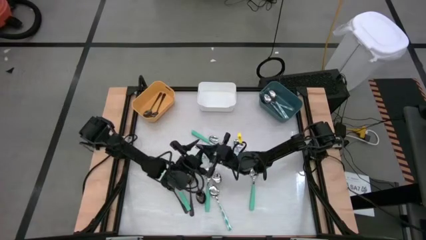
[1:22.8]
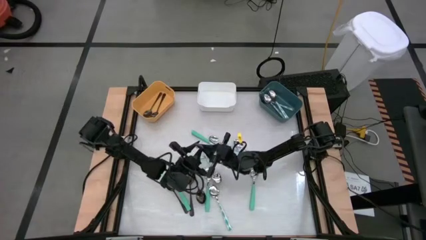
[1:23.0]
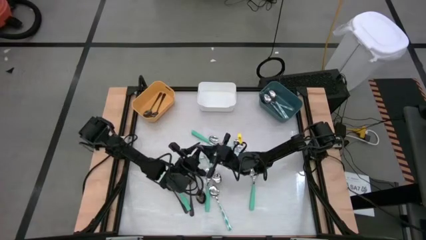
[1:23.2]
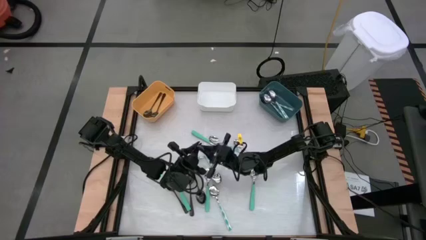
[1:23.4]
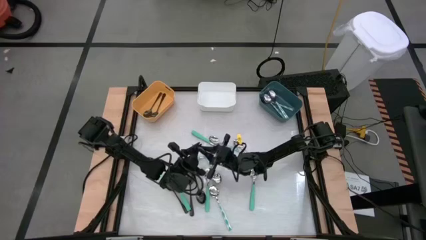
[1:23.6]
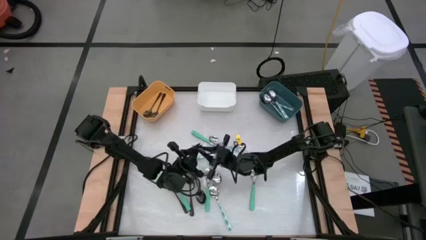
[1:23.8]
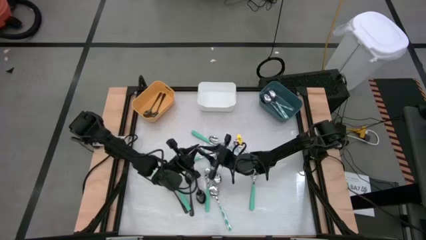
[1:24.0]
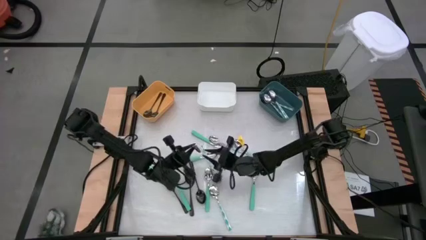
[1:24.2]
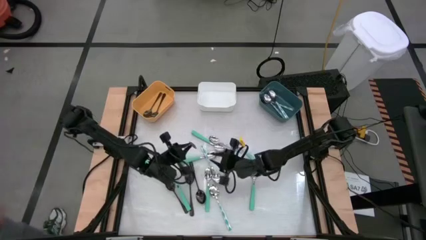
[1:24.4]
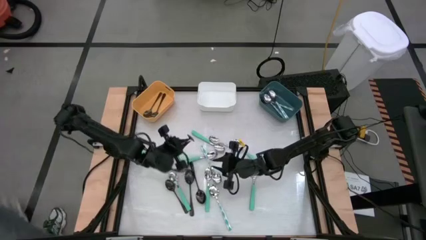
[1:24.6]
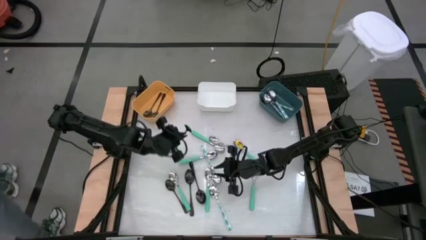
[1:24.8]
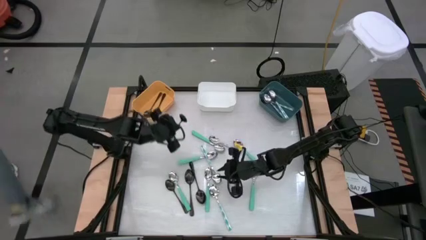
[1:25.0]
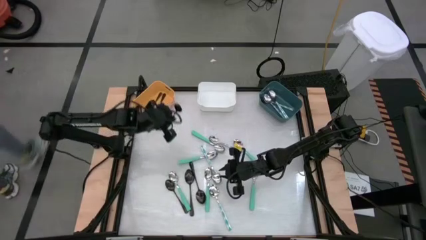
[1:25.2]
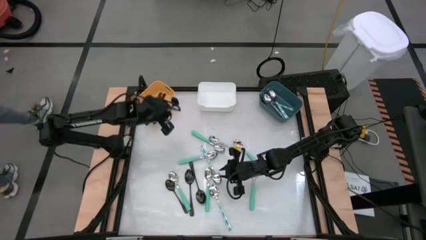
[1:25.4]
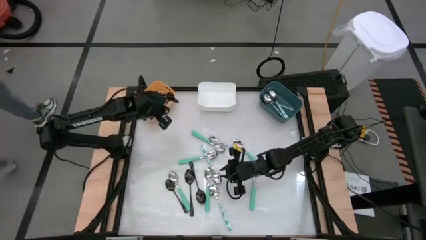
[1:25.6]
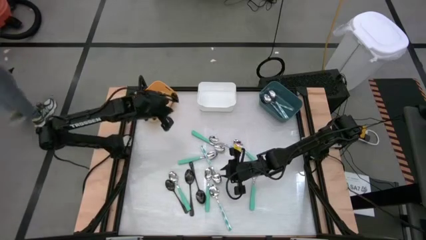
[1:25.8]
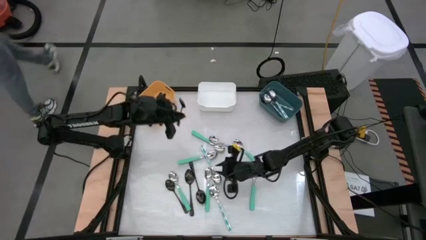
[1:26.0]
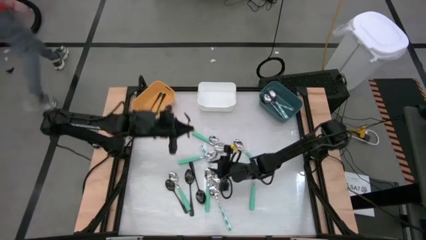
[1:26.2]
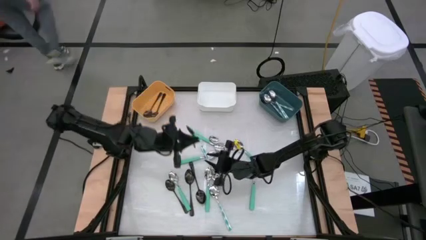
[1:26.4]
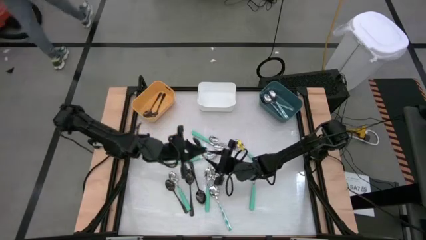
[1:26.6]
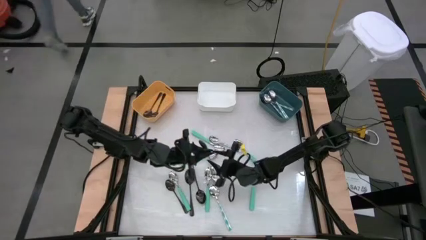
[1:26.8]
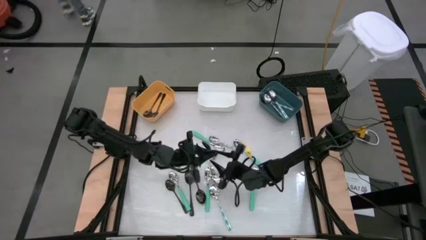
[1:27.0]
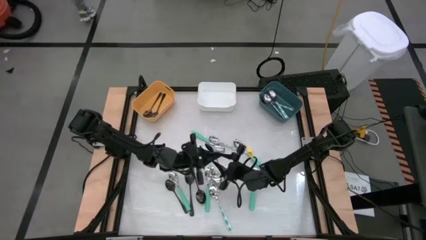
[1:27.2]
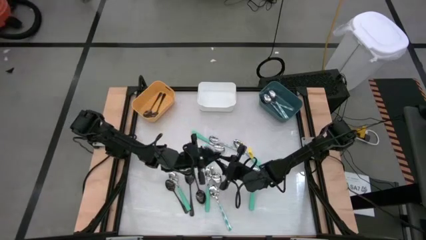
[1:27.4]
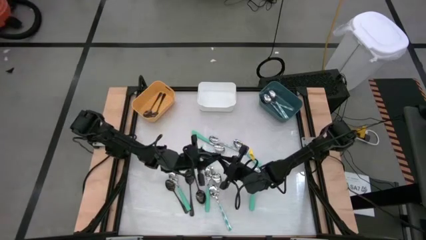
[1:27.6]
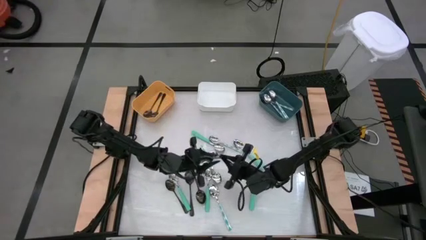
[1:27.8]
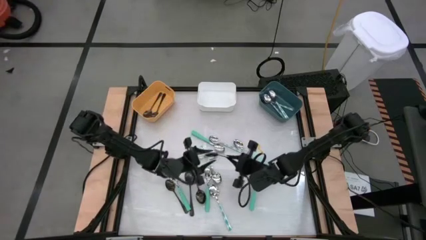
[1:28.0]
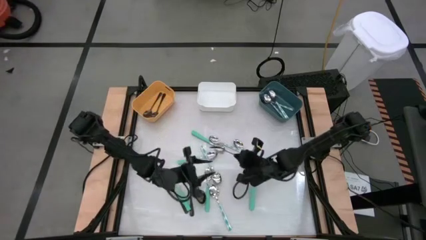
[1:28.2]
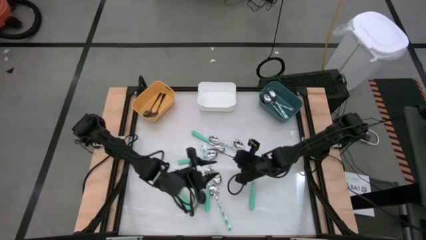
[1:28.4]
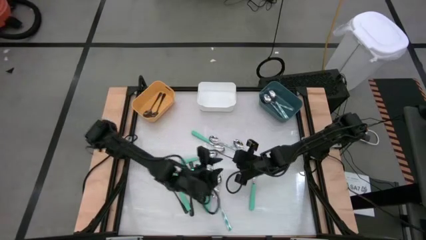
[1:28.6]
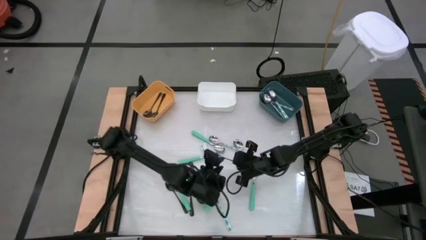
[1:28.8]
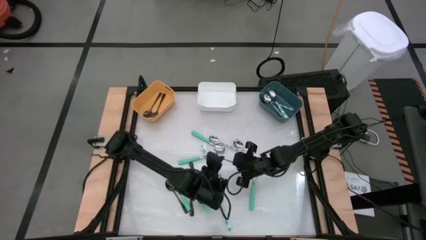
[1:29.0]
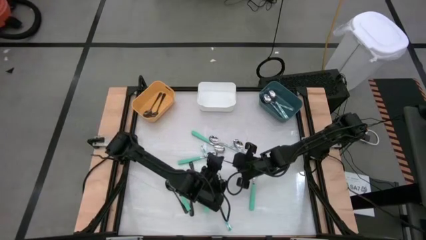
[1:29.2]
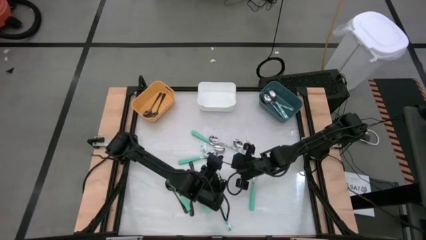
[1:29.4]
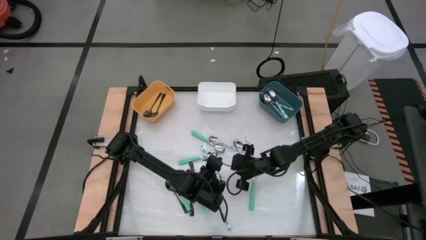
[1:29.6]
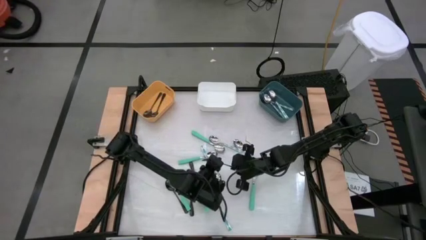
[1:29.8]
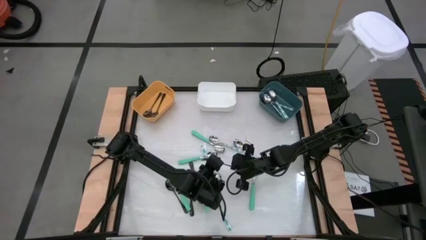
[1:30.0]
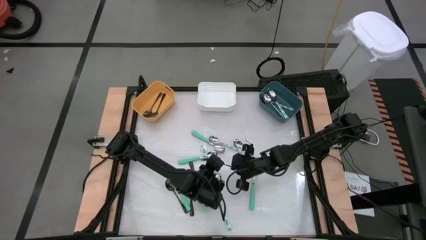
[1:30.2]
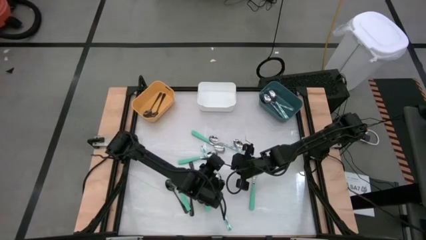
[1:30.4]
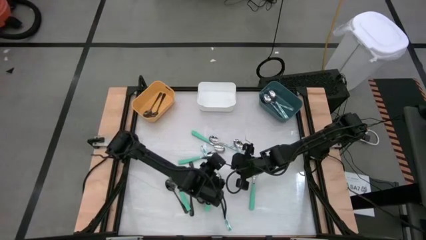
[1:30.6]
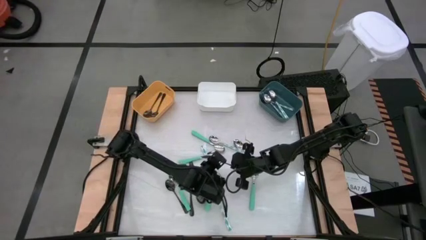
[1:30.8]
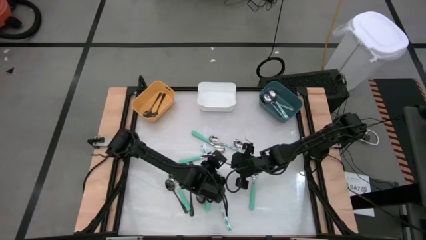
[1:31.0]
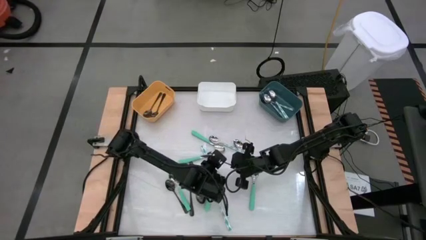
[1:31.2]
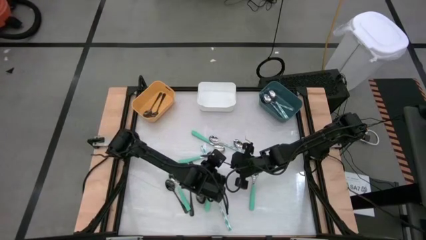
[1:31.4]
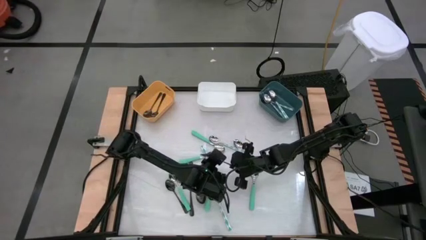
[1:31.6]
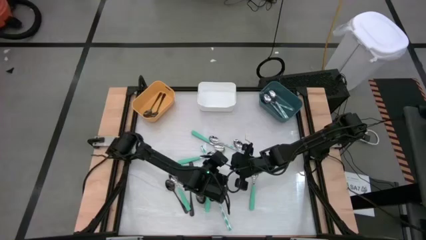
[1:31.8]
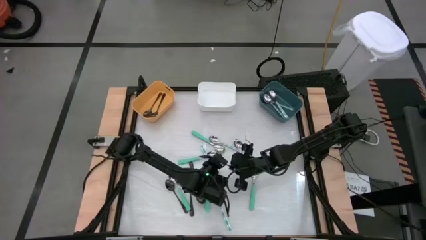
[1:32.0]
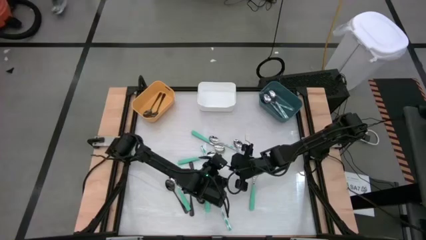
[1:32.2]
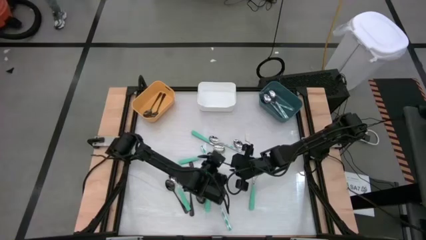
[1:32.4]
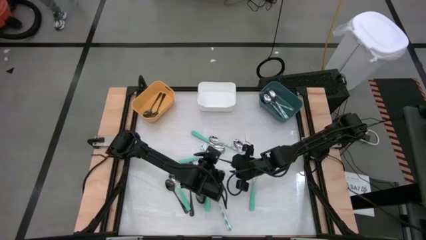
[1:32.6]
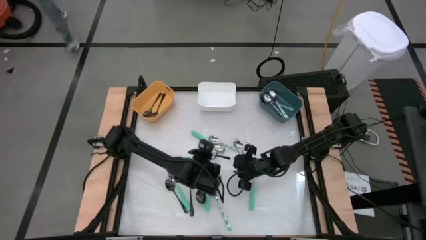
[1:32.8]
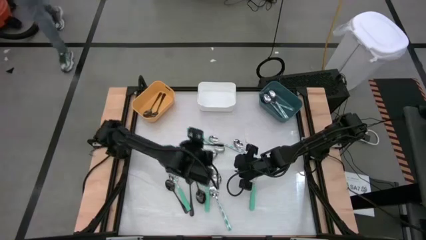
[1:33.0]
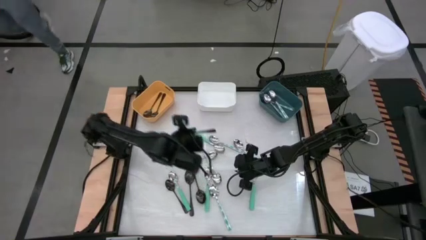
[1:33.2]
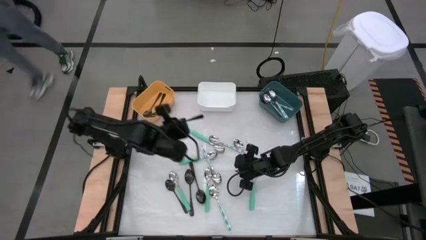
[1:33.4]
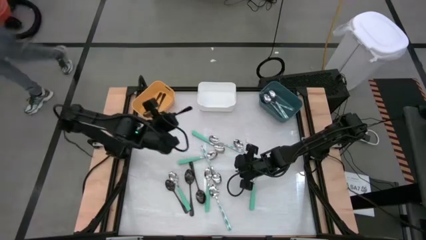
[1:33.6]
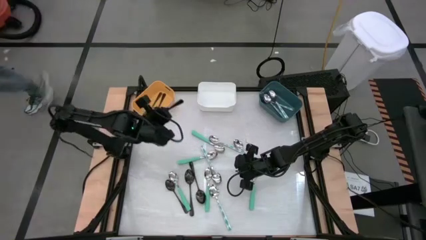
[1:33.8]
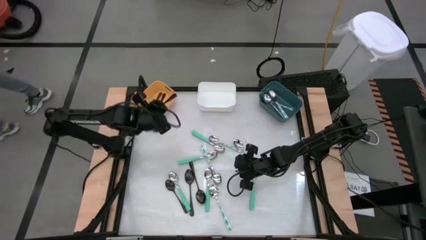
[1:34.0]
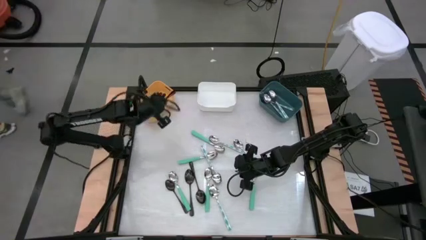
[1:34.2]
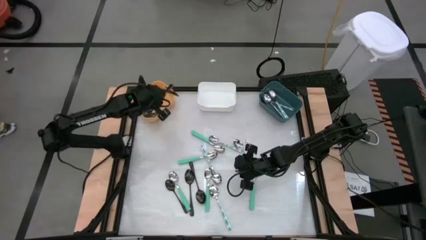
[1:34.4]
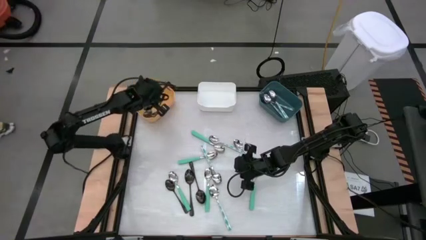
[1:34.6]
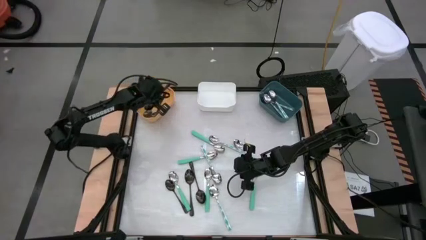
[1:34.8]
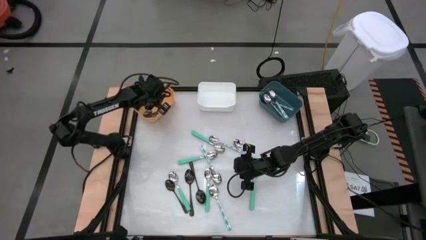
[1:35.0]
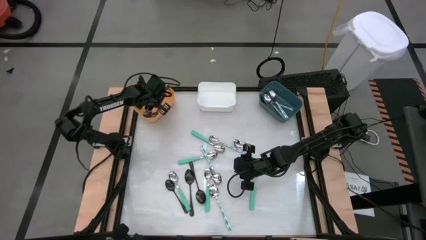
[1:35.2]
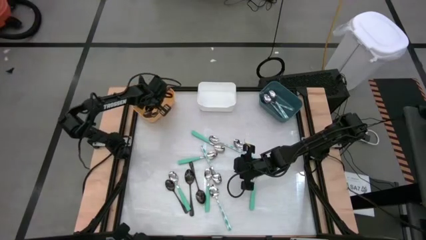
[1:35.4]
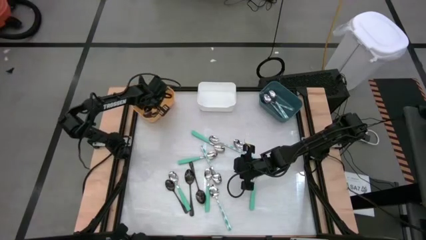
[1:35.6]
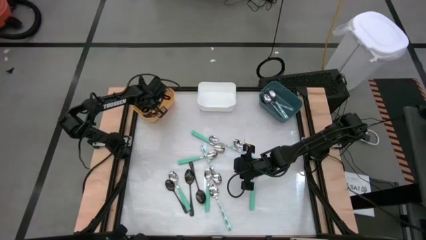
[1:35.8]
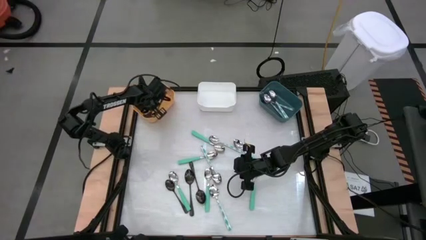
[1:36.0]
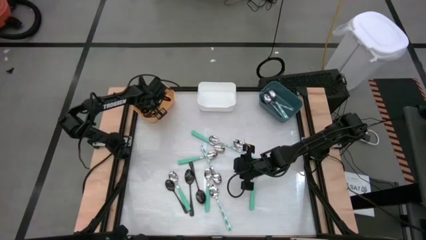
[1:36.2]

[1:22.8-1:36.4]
Task: Sort silverware by color (type)
Put the black spoon into the orange bin

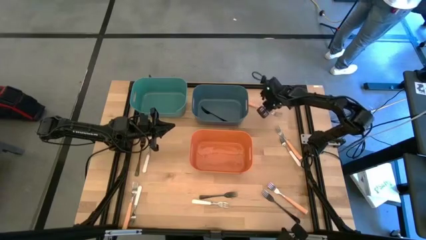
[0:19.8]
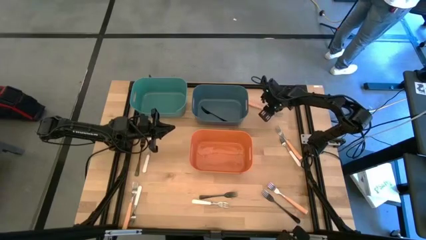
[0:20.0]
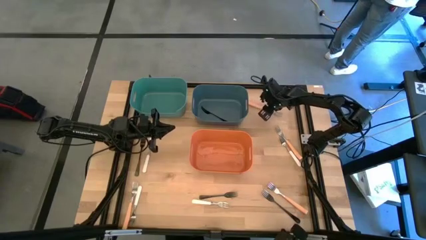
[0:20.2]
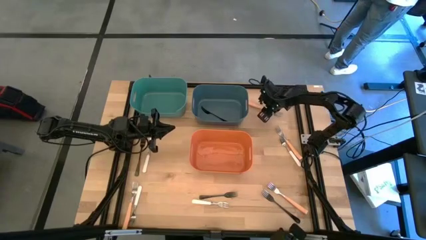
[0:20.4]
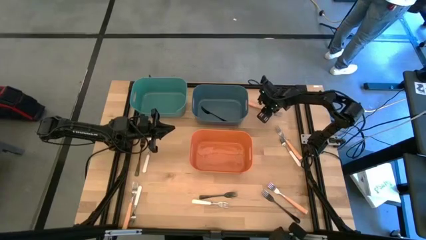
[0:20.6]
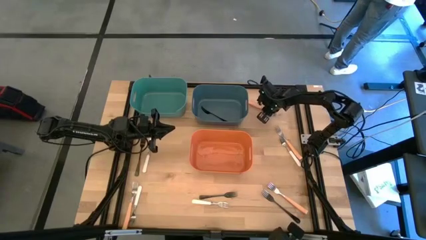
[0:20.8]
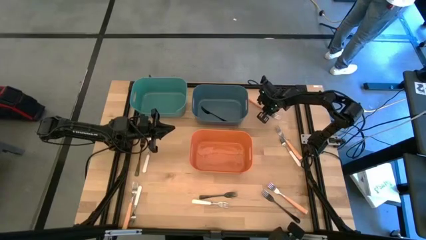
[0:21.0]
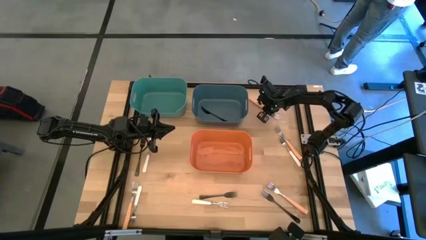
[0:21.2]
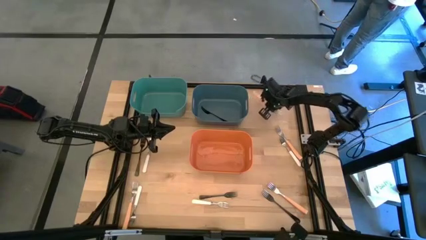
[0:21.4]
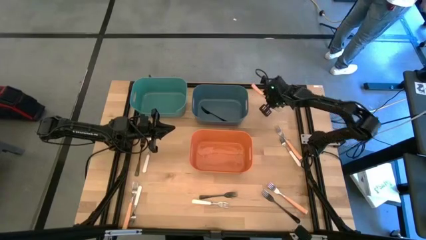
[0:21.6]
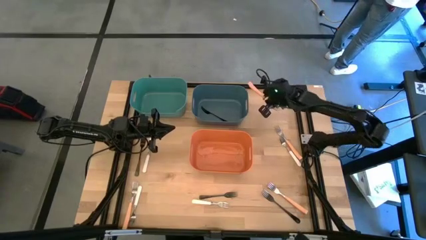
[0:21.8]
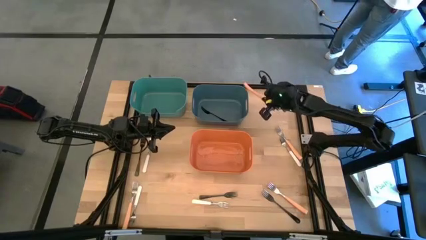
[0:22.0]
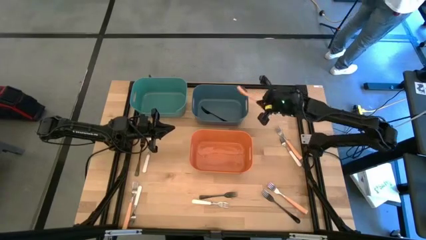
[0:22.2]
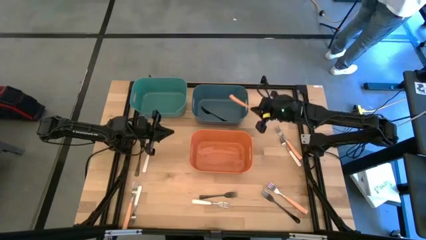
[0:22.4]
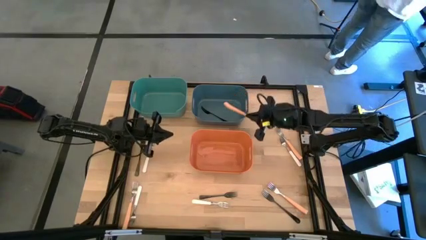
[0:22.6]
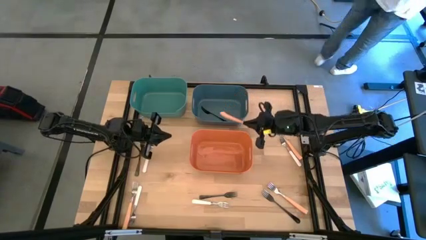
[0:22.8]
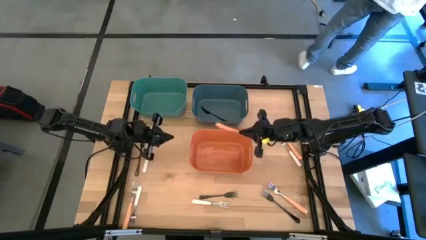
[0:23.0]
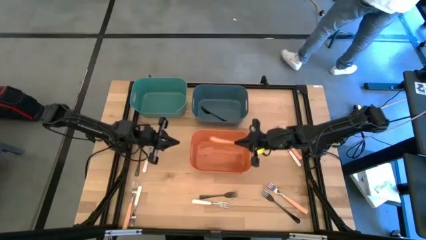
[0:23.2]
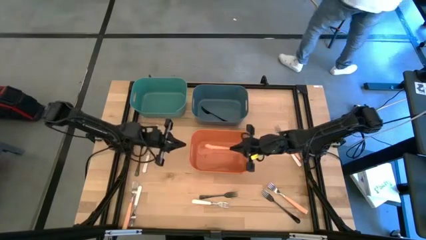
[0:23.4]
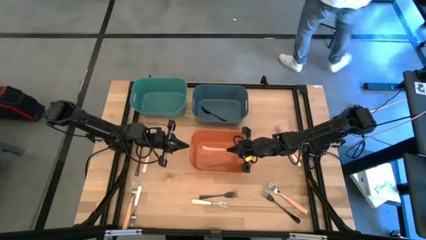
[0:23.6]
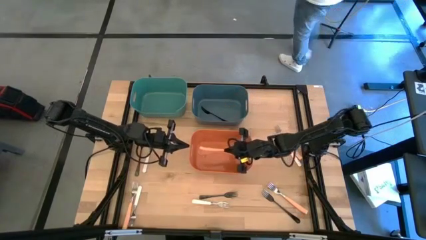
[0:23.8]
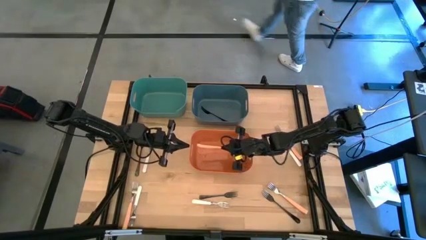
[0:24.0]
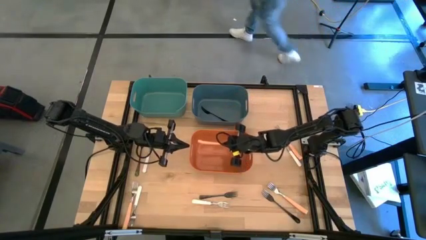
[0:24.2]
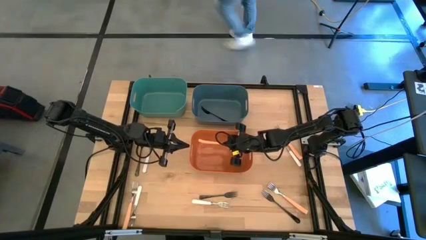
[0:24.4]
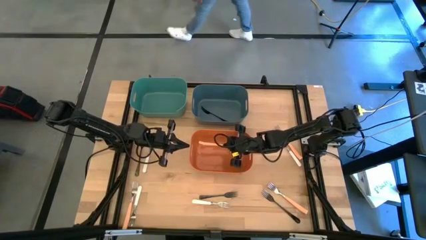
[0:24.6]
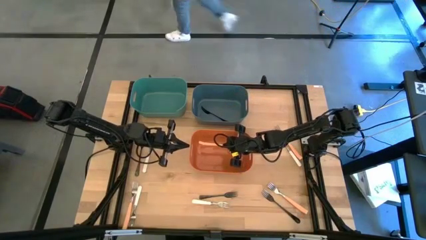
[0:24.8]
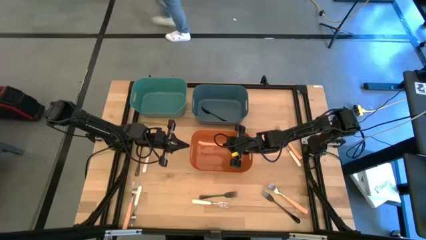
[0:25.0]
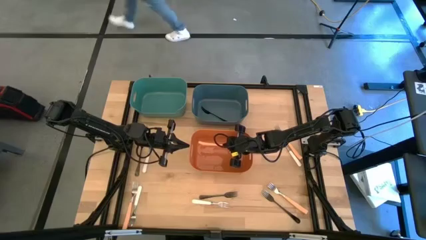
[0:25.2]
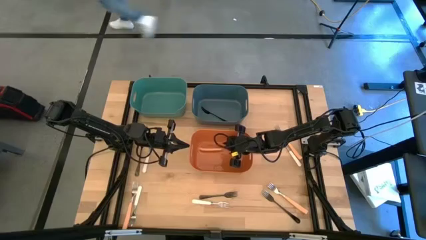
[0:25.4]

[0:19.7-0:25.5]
Task: Sort silverware by color (type)
Put the orange fork into the orange bin
